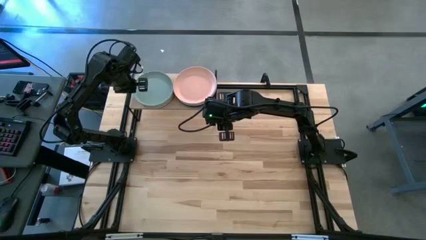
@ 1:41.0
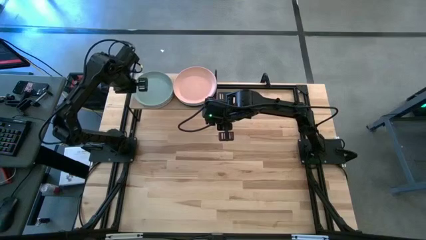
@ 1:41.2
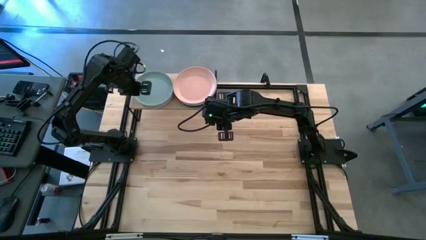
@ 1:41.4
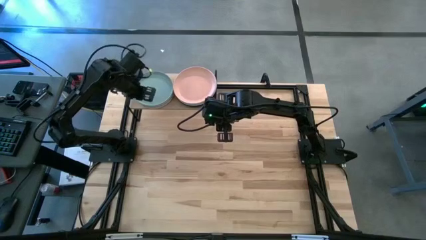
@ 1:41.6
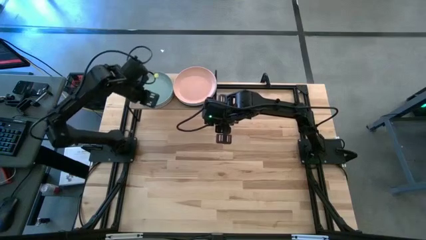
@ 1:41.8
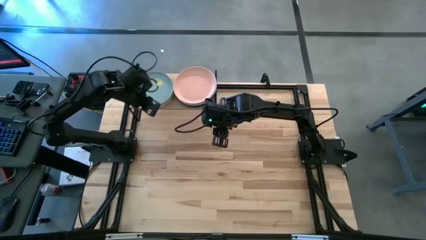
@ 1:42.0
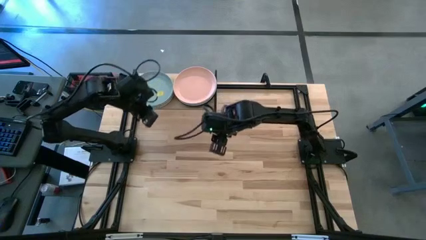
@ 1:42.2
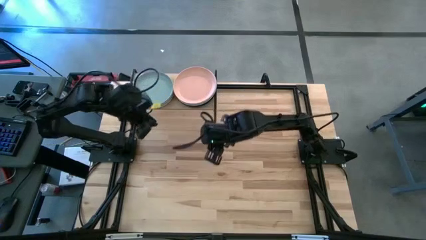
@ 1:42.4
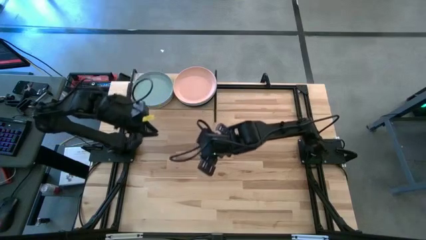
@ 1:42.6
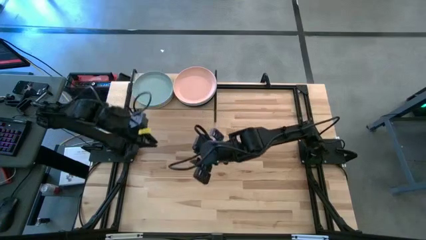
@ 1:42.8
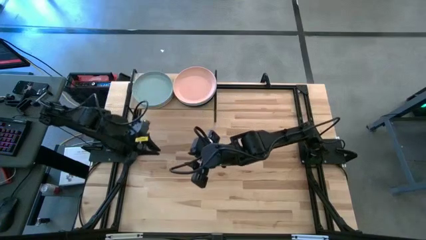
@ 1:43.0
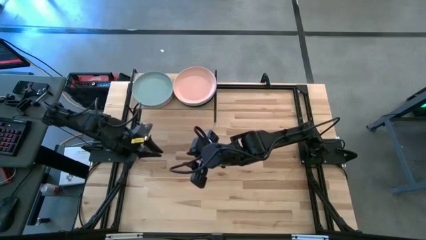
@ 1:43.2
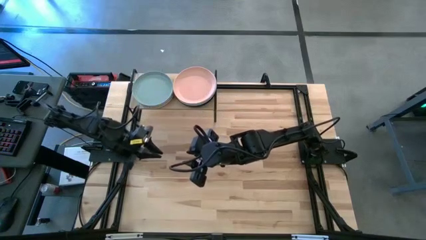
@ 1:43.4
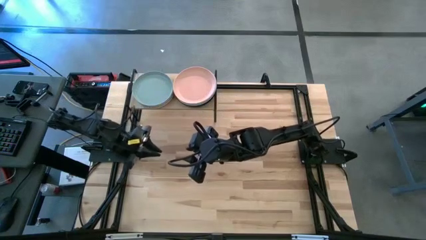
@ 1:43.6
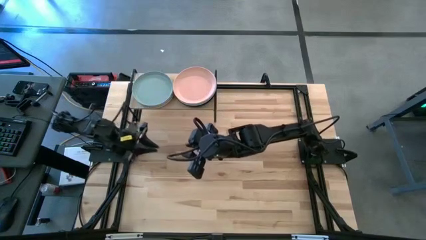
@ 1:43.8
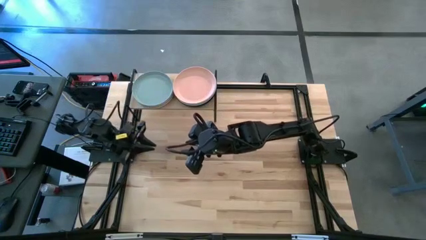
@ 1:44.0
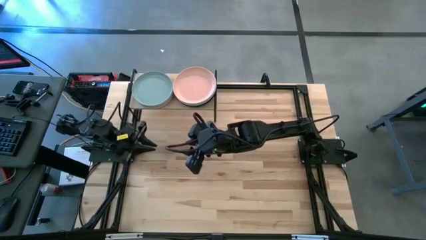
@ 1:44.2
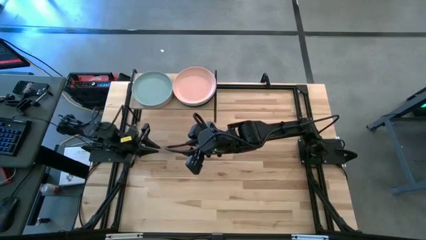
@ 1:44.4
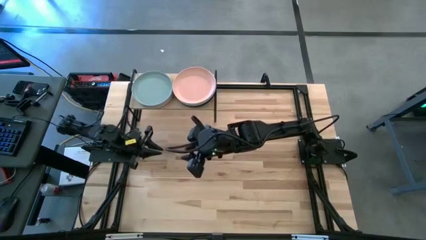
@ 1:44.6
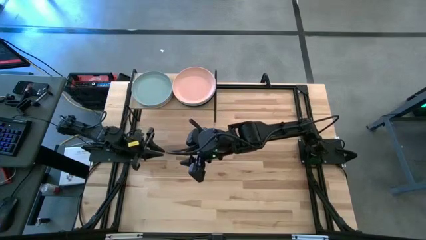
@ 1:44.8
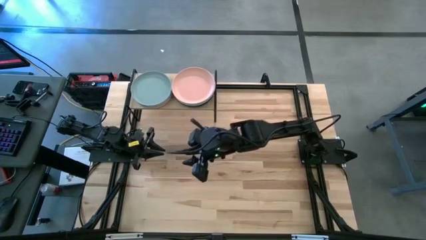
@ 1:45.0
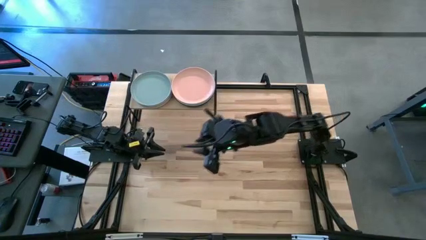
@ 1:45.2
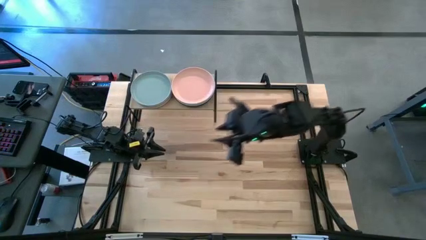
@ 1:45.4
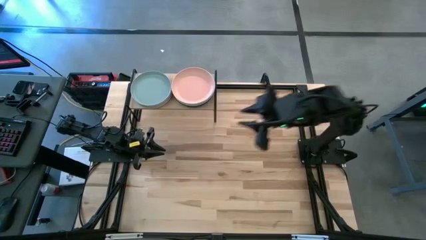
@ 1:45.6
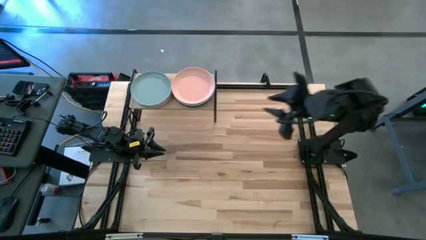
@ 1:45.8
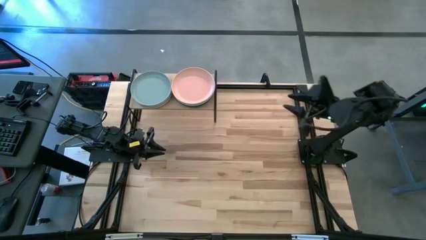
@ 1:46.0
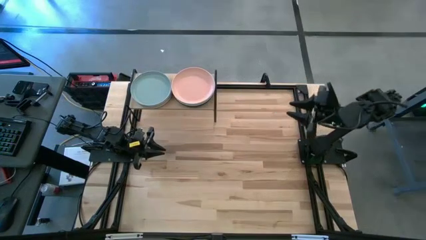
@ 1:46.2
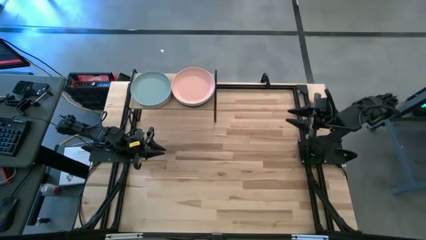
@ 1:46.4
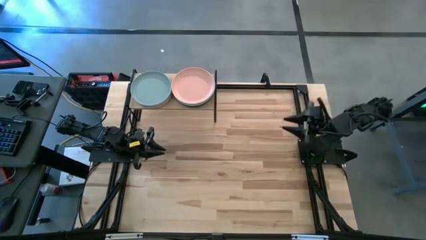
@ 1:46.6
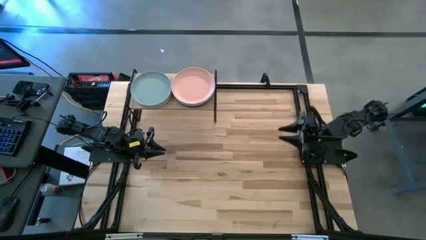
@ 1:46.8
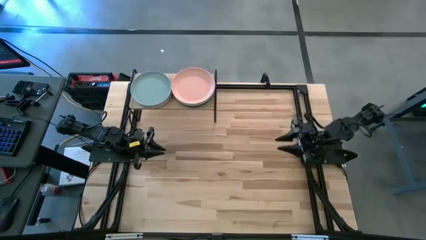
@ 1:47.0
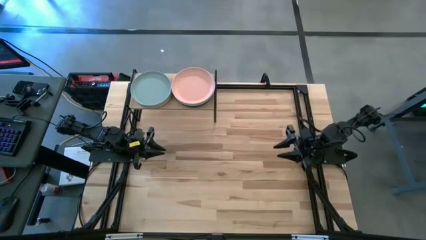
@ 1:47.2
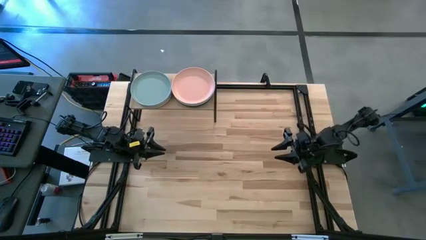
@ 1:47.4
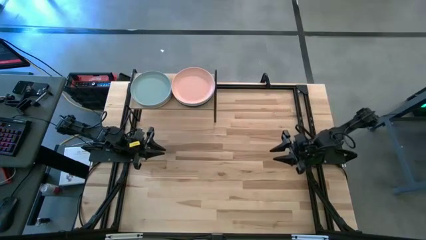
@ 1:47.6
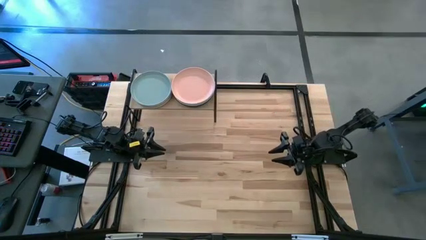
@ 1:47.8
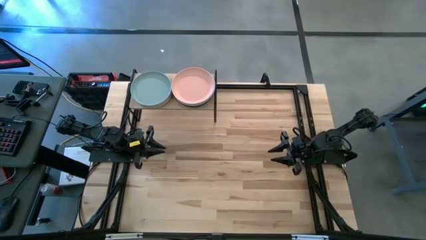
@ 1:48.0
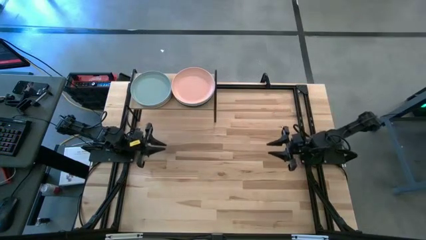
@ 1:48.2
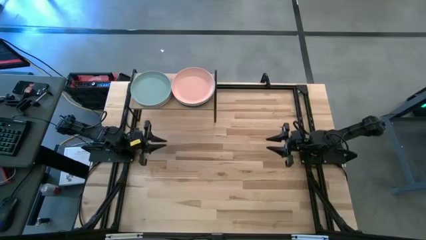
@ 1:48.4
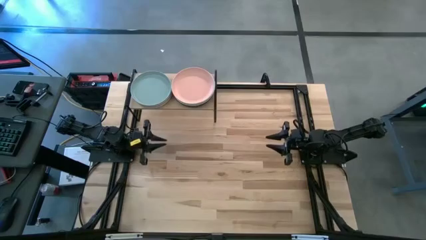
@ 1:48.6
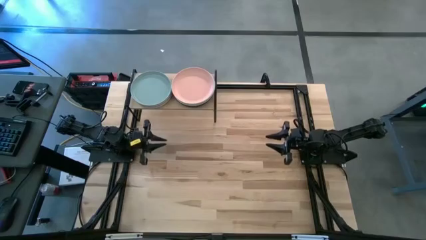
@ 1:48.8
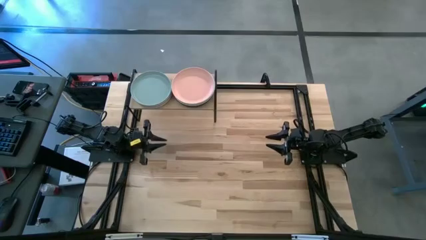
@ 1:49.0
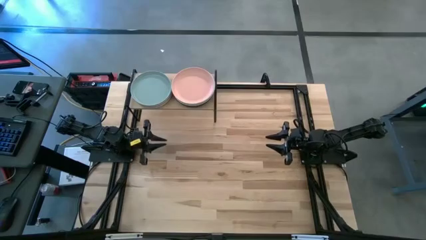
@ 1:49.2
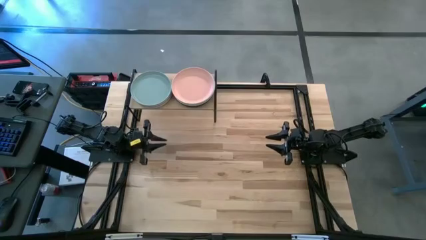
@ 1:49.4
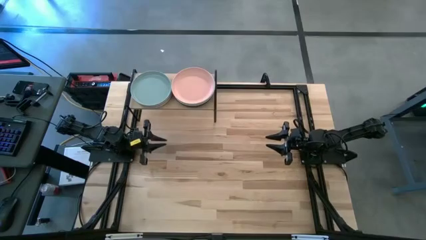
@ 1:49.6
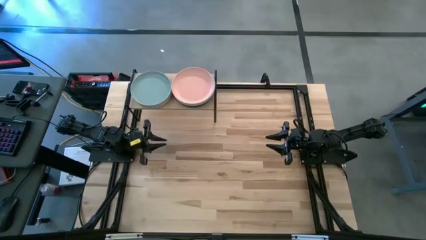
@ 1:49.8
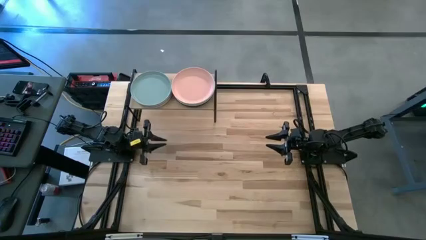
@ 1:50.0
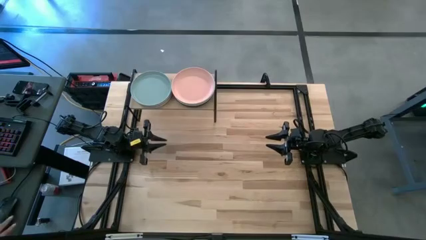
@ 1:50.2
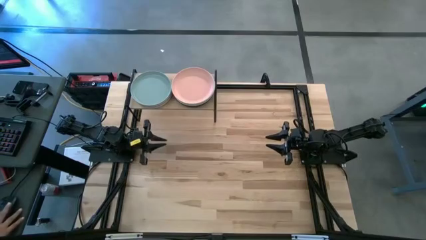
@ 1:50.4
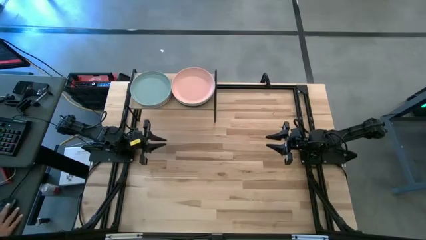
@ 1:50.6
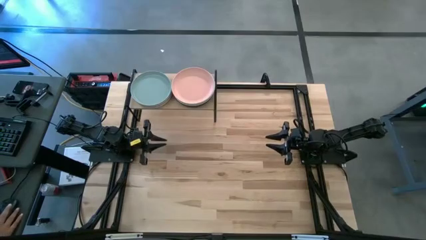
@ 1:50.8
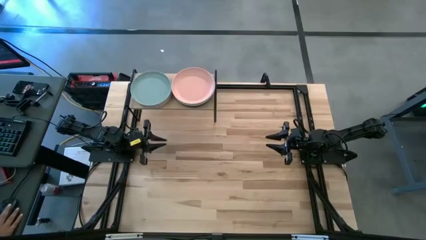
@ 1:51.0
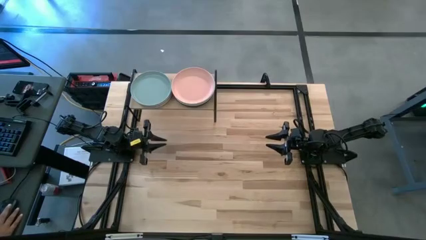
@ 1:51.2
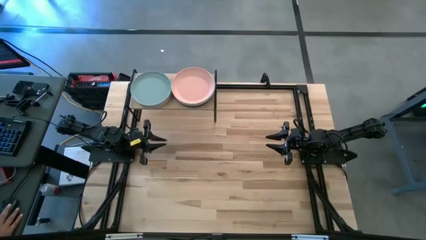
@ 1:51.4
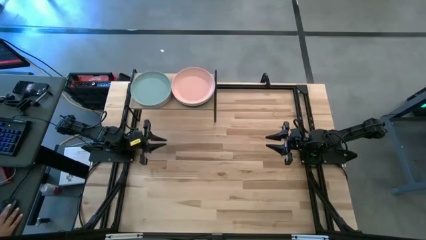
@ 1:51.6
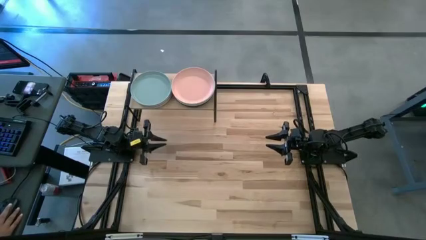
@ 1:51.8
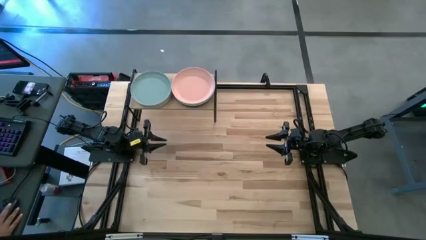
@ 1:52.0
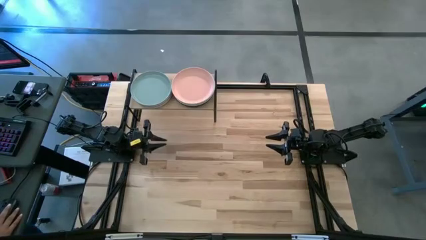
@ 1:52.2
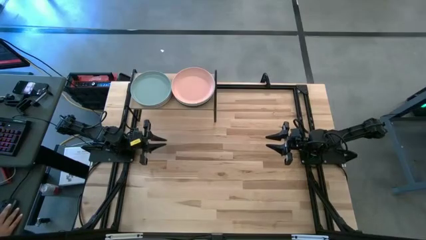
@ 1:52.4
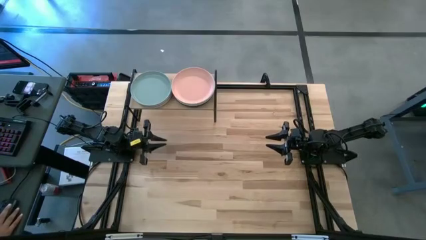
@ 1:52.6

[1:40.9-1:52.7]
Task: Place and stack plates onto a shelf
Return to Home Position

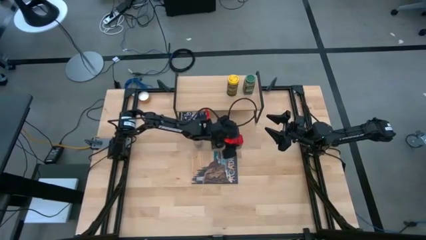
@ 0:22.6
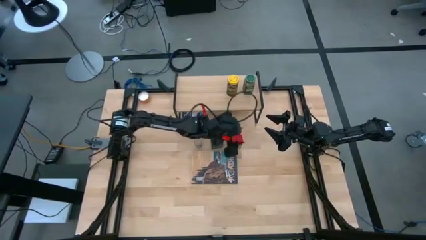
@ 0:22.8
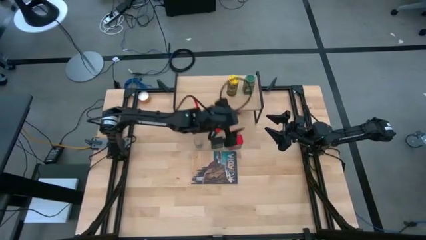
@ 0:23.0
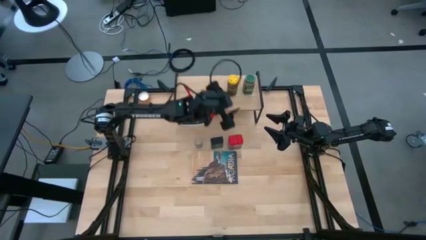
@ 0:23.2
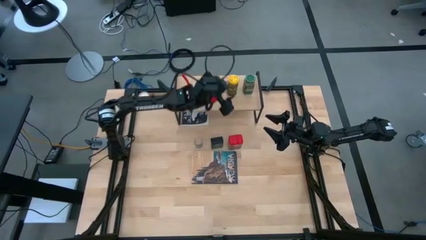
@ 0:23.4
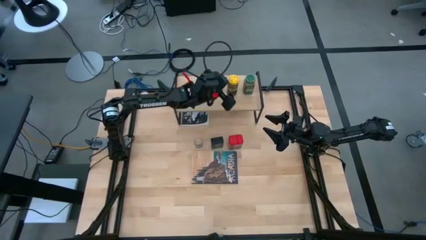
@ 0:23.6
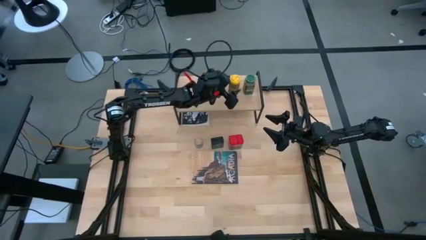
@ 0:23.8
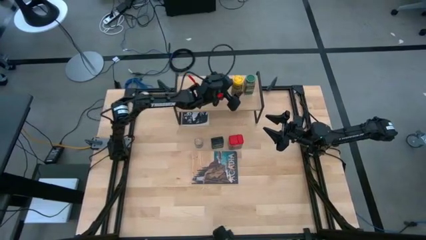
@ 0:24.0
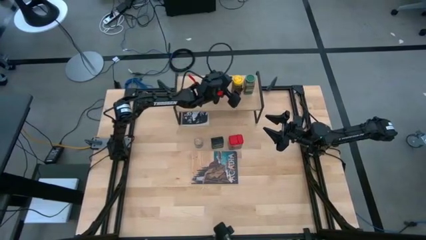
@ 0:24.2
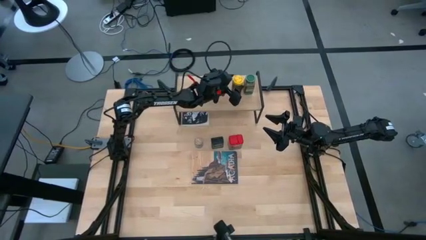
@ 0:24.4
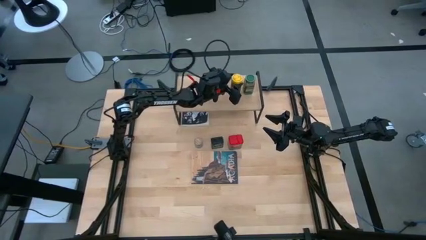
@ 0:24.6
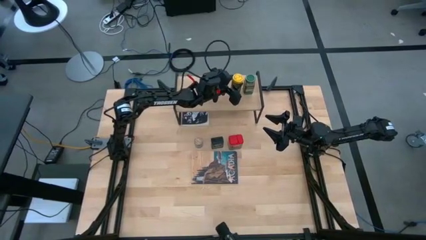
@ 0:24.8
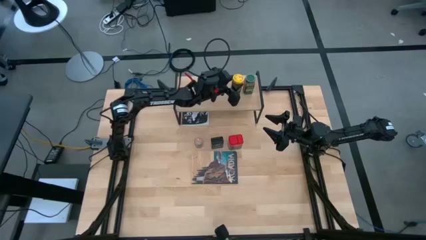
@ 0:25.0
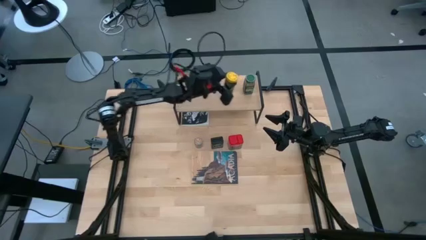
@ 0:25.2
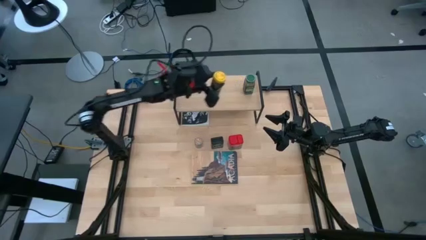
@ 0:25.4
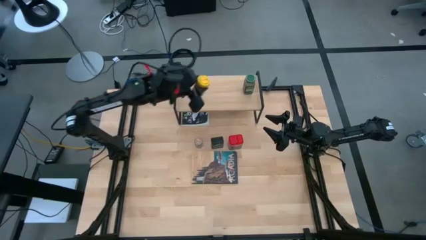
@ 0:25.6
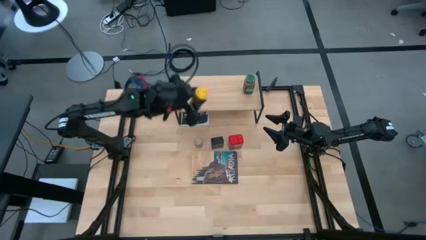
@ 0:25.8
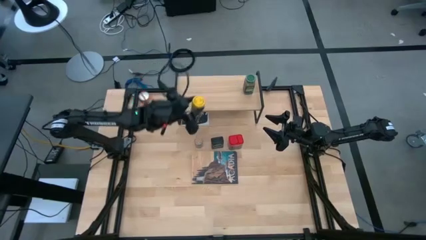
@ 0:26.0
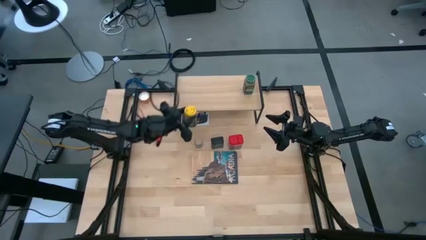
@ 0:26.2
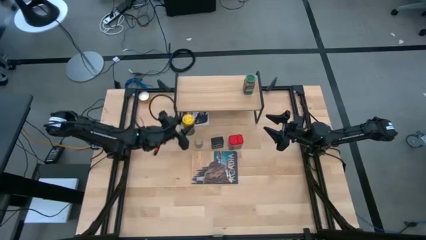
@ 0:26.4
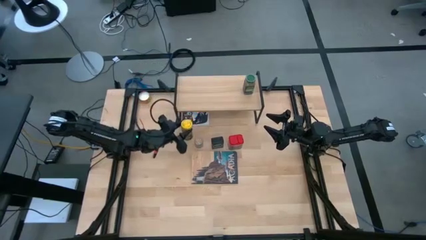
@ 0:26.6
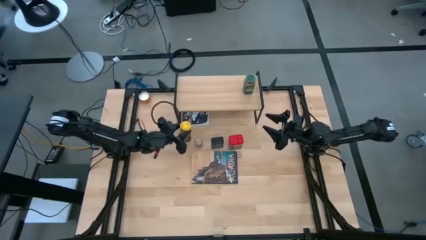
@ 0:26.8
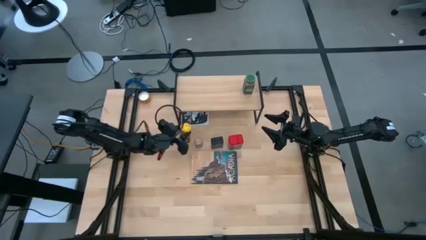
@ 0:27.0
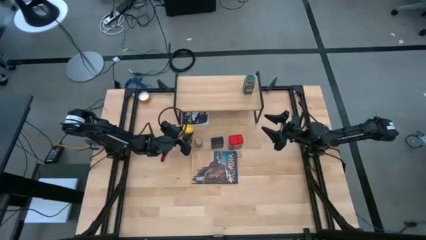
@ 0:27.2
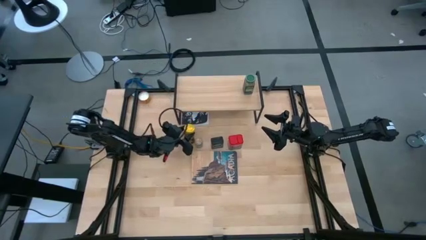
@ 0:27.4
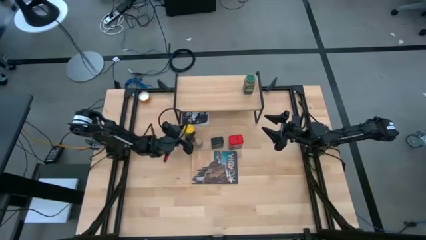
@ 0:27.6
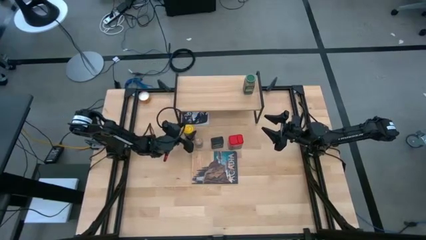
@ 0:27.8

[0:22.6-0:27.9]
Task: Shelf spices
Remove the yellow seasoning bottle from the shelf
